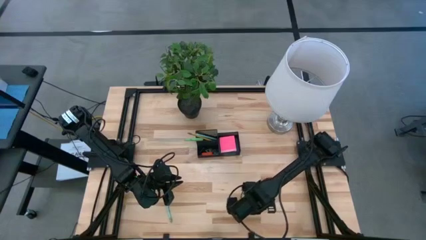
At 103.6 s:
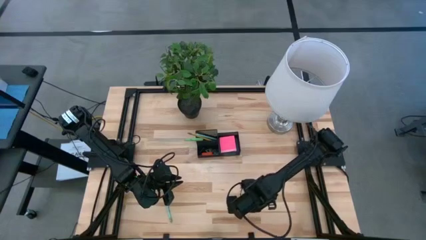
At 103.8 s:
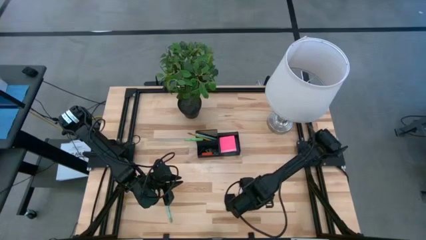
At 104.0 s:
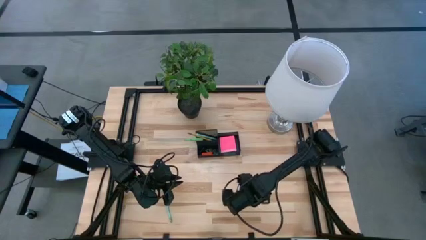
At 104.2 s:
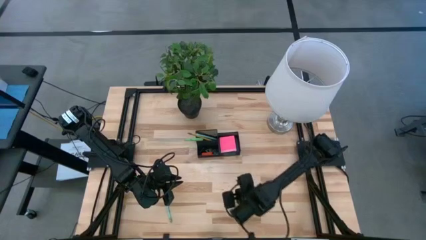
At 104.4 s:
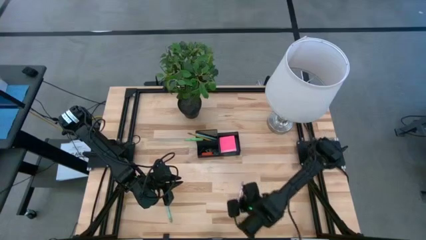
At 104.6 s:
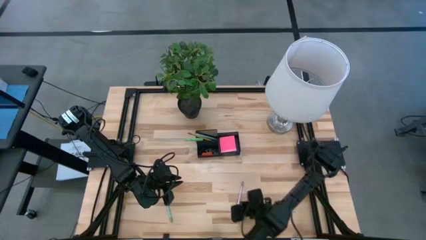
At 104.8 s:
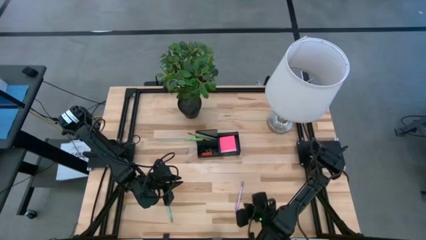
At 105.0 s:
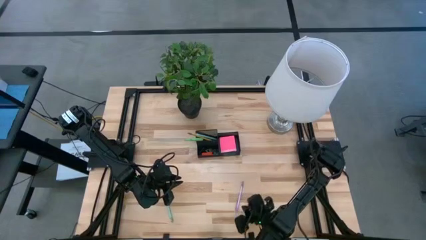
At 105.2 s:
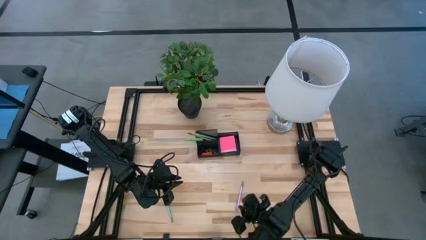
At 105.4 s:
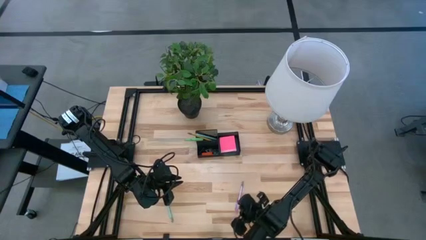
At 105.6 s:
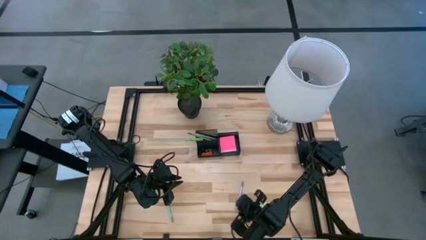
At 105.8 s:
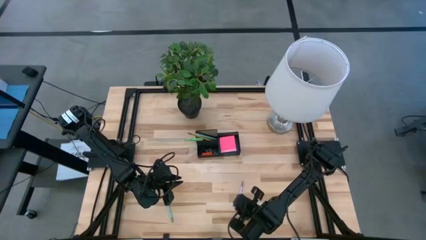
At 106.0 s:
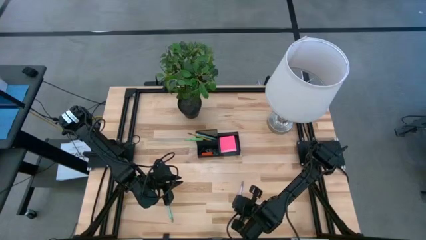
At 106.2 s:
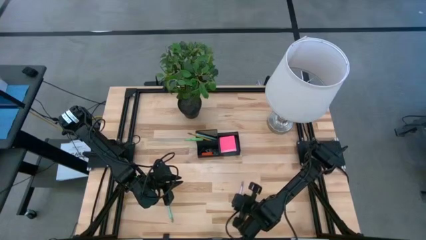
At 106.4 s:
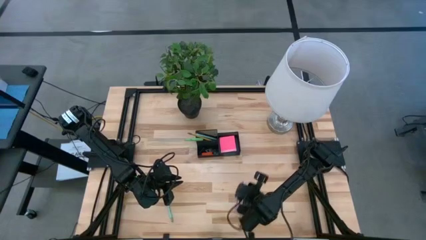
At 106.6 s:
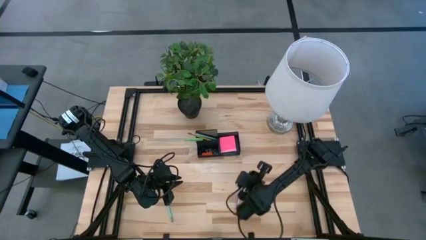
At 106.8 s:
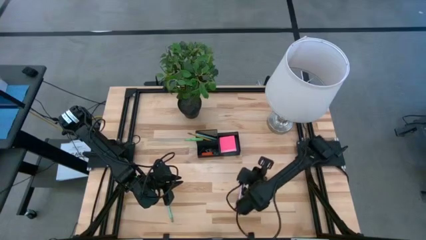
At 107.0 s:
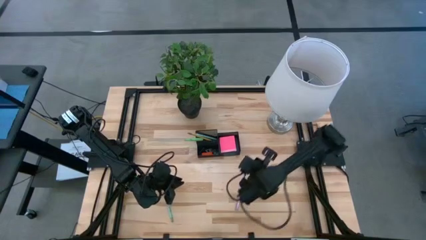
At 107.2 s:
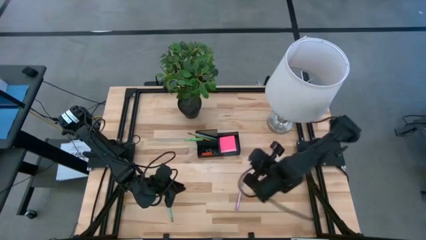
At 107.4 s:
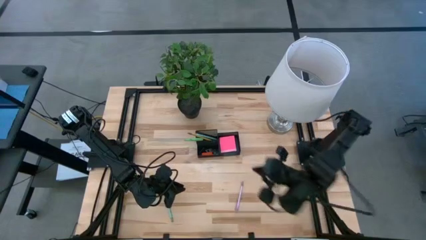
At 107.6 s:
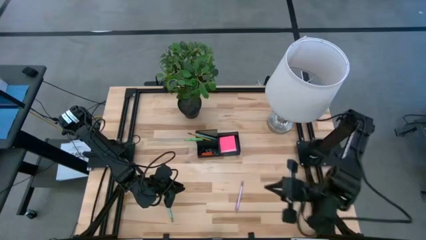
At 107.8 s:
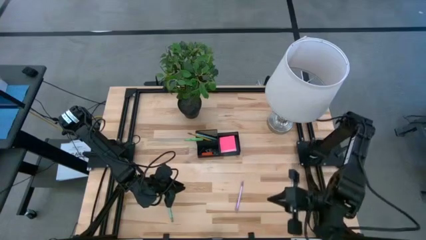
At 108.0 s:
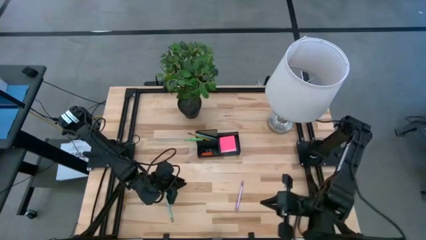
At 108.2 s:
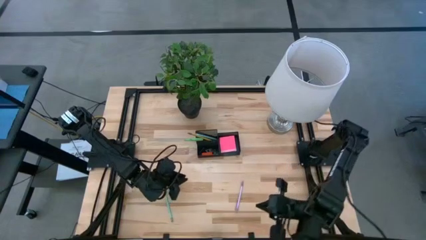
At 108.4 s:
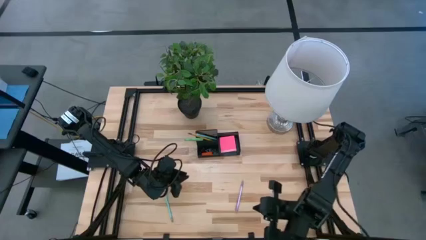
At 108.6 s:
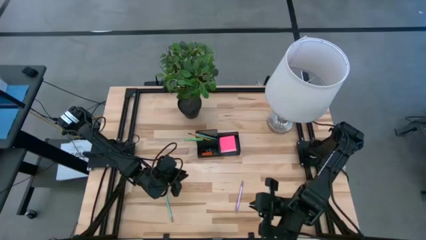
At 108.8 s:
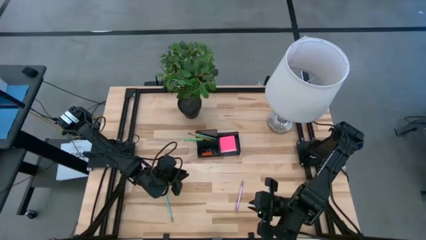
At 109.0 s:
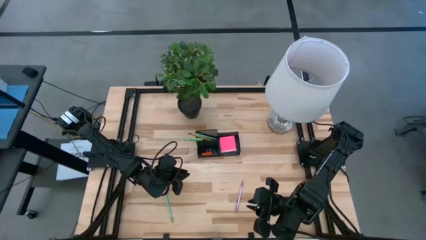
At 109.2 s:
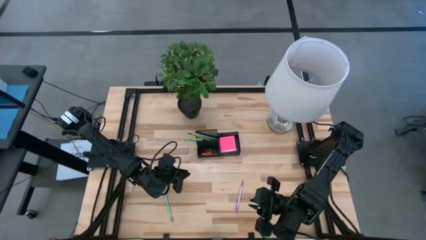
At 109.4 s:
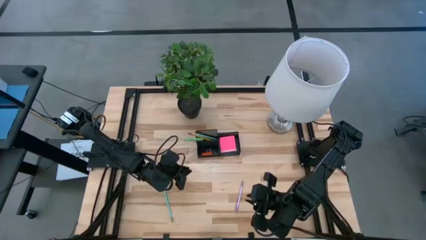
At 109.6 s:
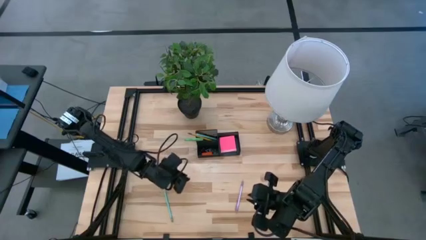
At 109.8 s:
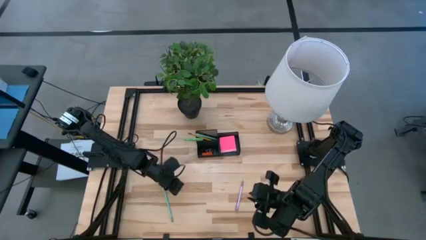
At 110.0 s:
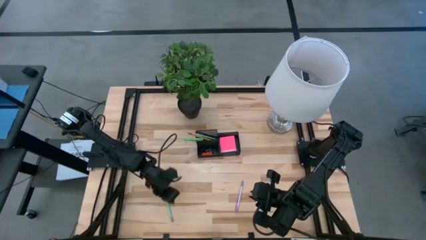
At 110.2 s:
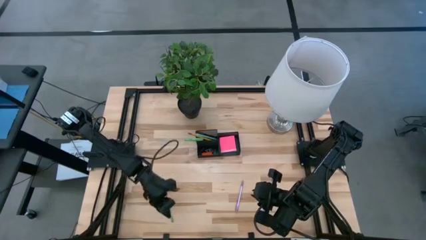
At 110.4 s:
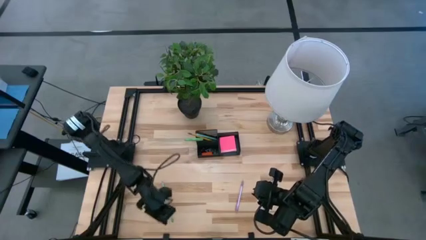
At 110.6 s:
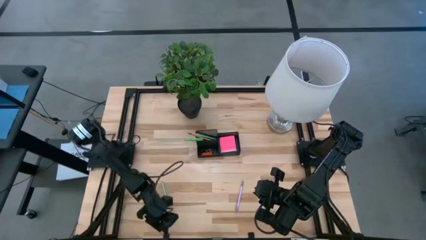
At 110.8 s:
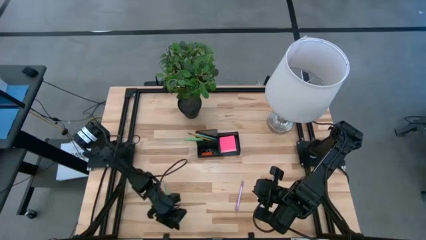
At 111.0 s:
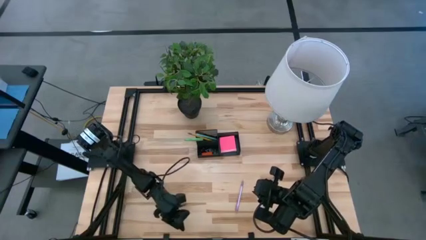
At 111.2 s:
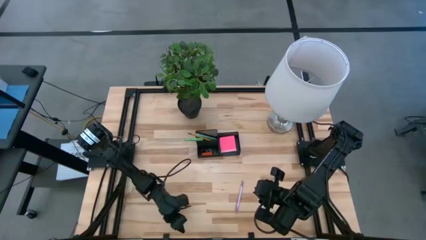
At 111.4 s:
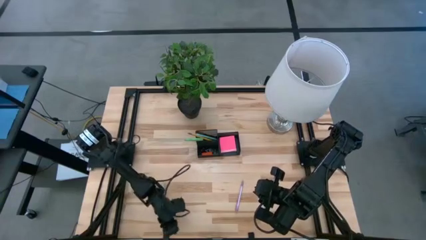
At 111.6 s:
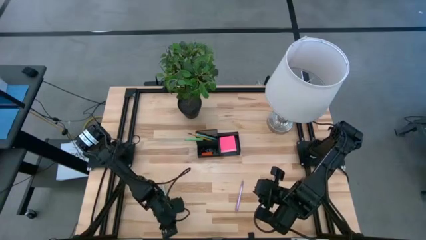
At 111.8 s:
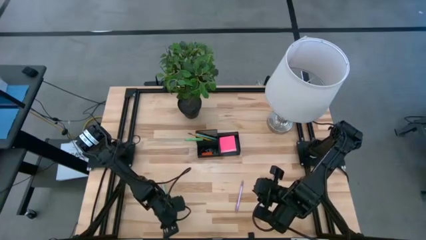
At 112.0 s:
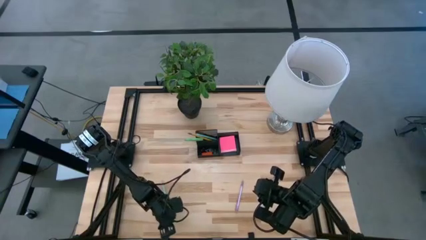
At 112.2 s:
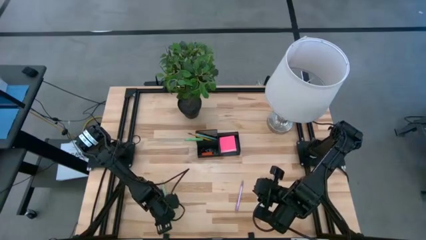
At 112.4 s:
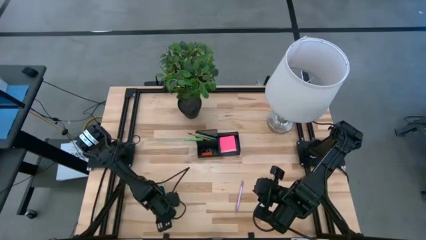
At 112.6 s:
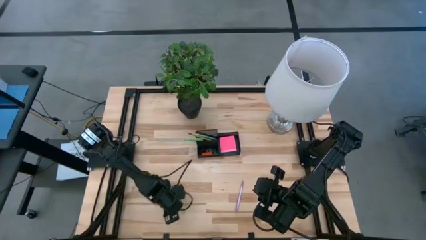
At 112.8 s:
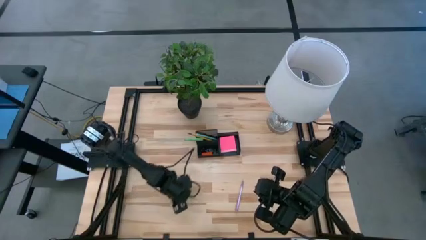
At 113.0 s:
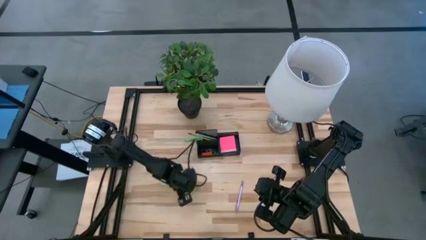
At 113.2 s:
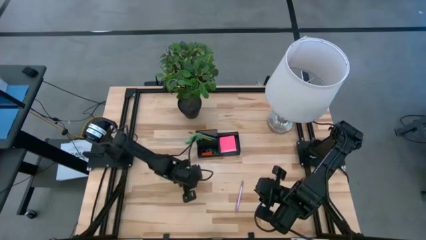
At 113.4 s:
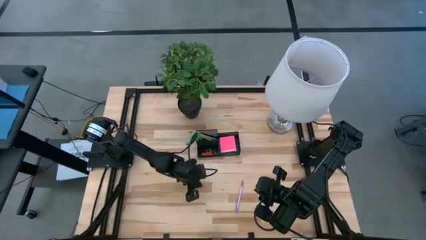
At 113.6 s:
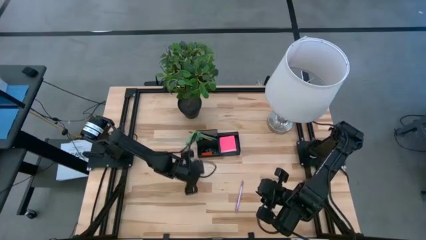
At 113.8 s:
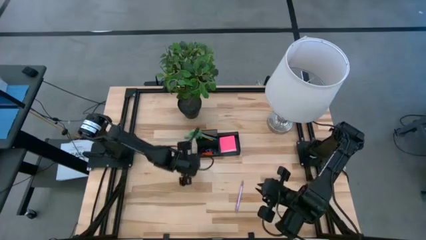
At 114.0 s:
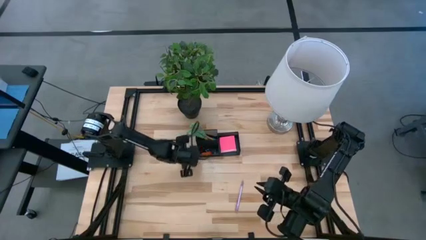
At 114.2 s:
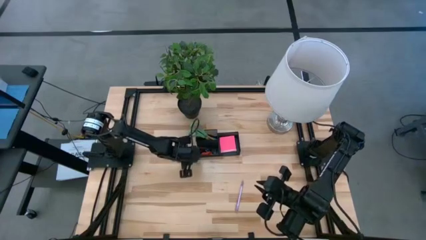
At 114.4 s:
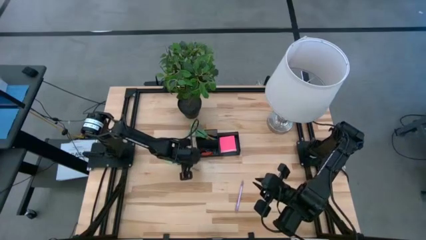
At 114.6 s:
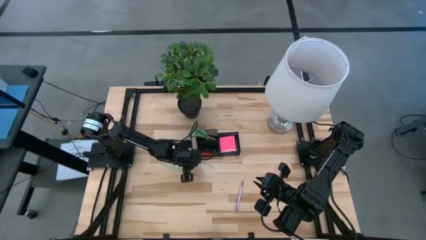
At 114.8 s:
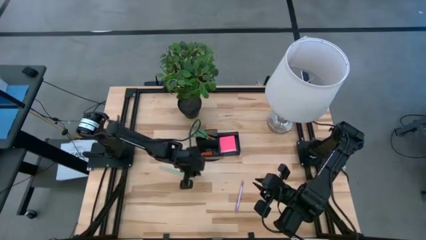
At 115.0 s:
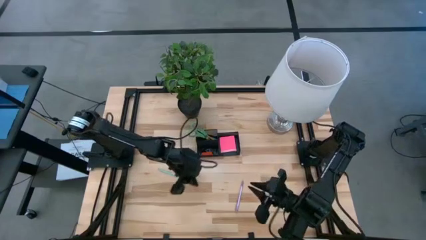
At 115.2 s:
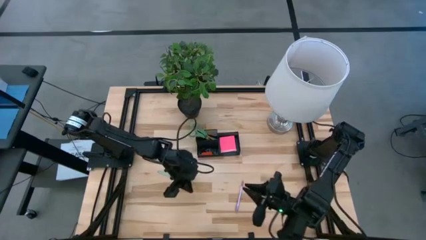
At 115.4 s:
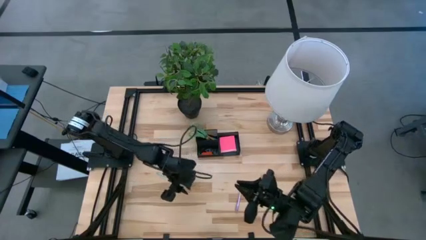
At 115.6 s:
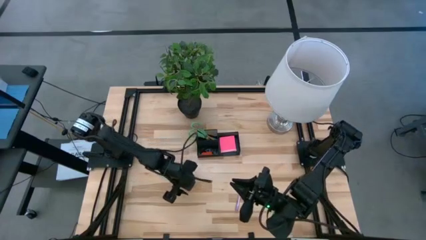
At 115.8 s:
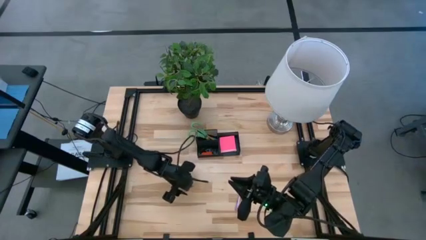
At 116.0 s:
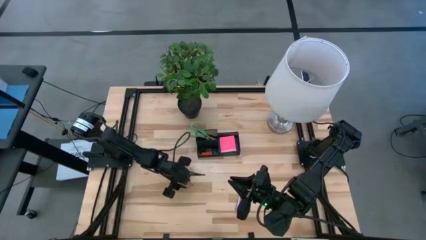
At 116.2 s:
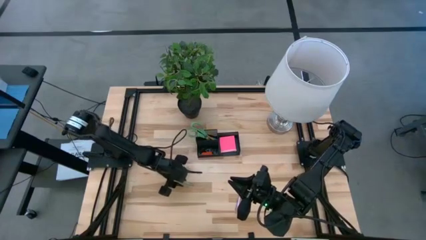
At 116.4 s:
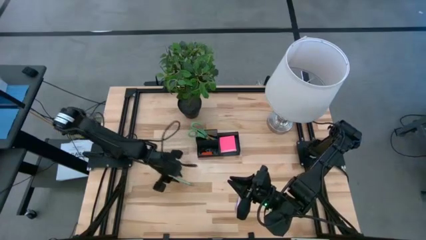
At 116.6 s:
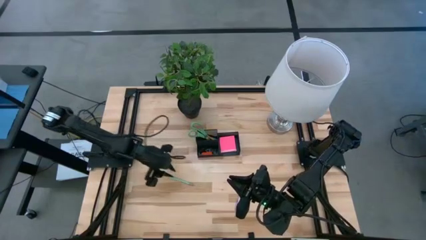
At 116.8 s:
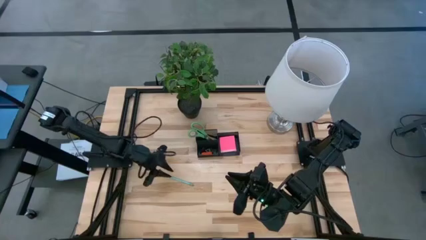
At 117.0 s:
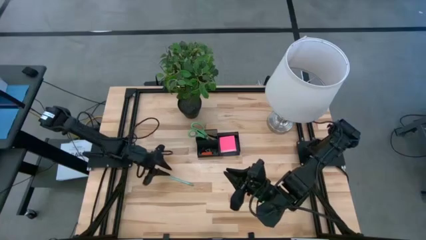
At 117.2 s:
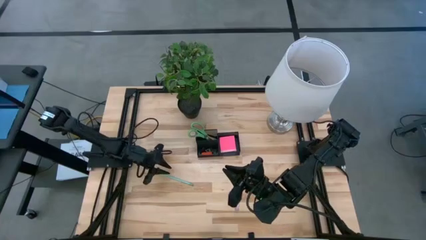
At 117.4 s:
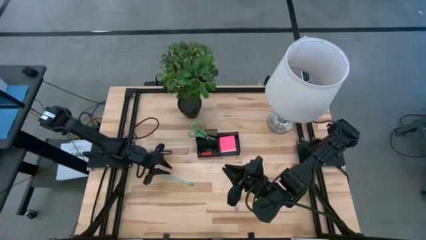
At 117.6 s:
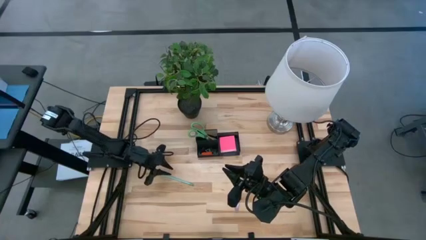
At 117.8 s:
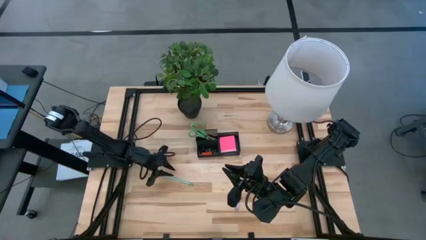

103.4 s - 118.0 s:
Task: Pick and place office supplies into organizer
Put the blue pencil into the black desk organizer
